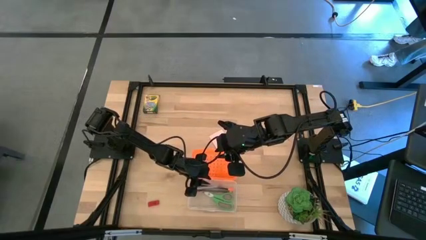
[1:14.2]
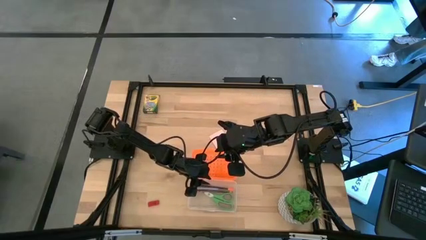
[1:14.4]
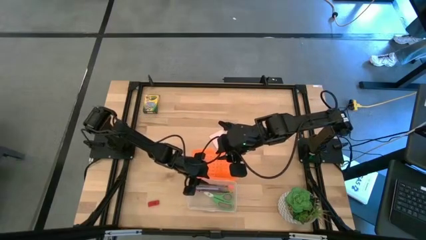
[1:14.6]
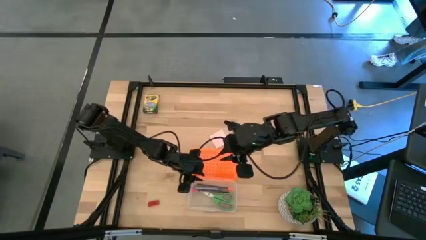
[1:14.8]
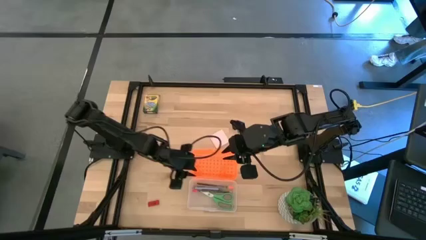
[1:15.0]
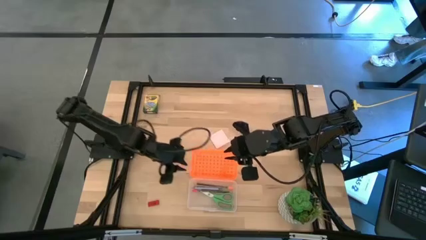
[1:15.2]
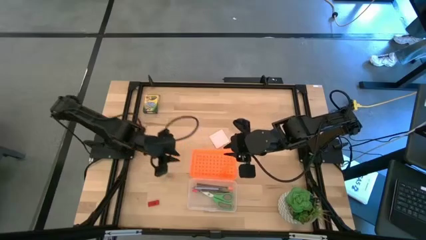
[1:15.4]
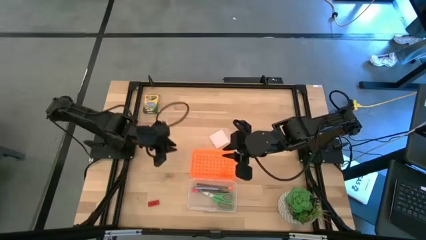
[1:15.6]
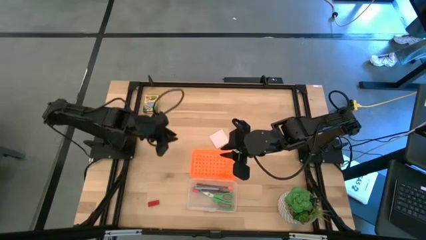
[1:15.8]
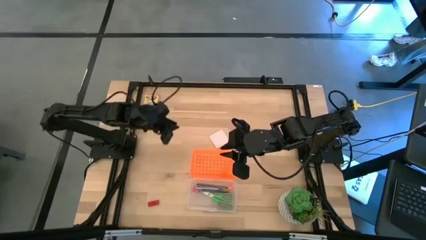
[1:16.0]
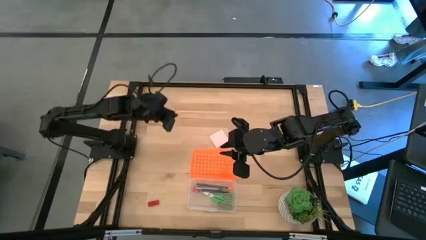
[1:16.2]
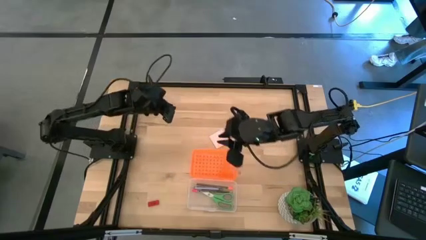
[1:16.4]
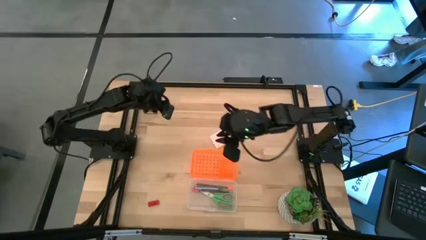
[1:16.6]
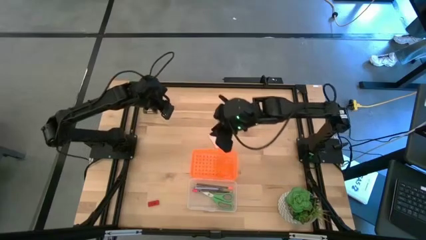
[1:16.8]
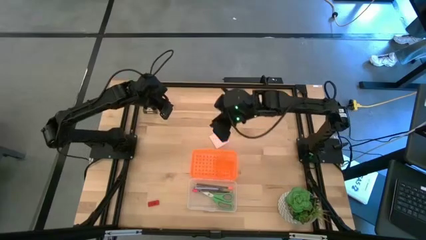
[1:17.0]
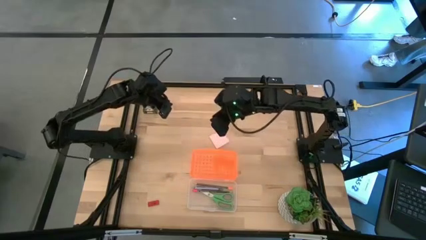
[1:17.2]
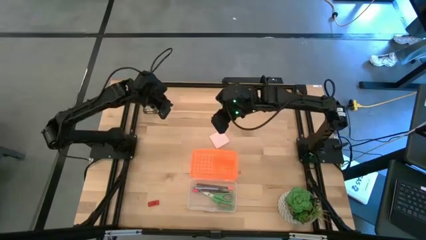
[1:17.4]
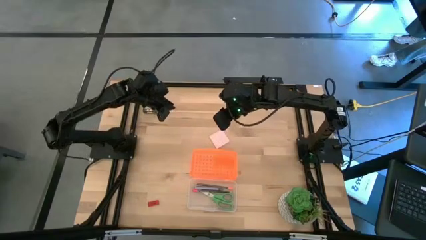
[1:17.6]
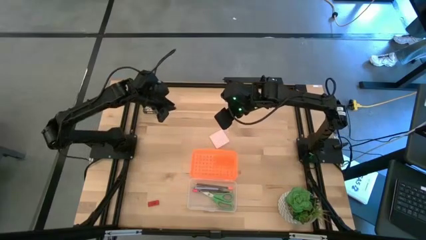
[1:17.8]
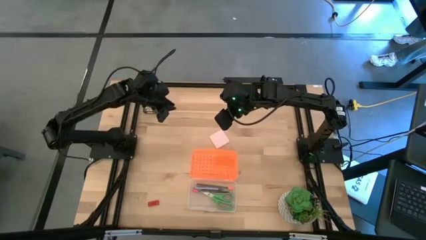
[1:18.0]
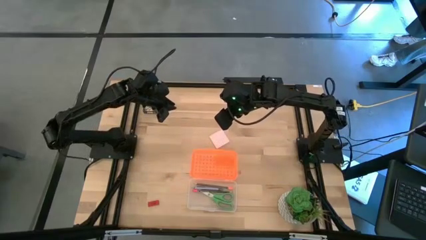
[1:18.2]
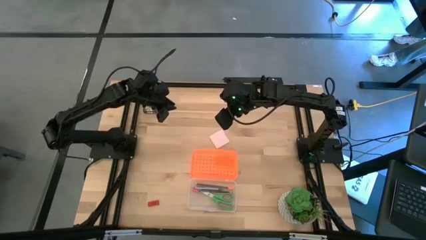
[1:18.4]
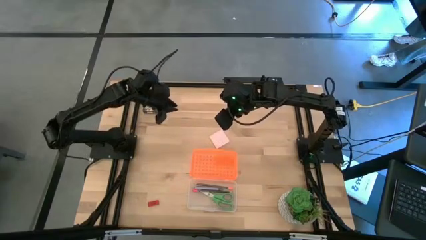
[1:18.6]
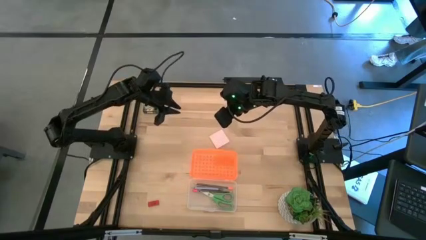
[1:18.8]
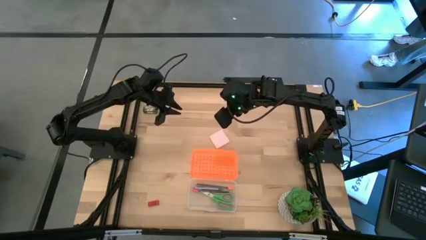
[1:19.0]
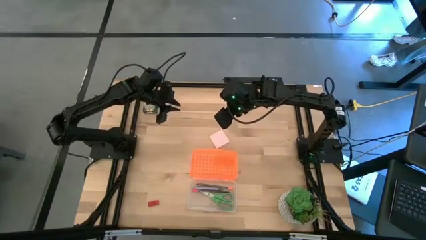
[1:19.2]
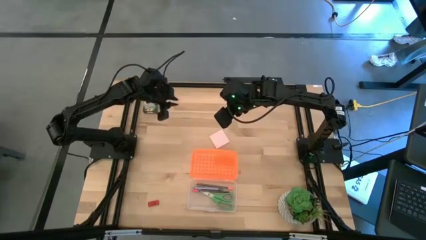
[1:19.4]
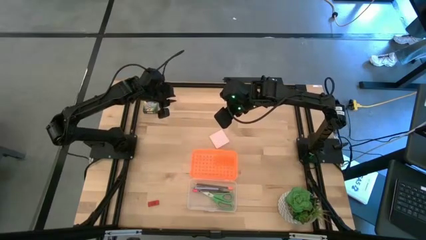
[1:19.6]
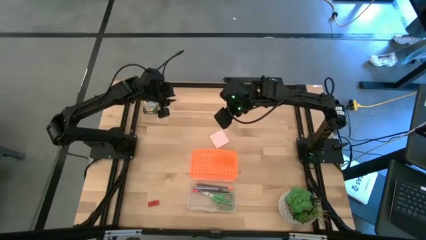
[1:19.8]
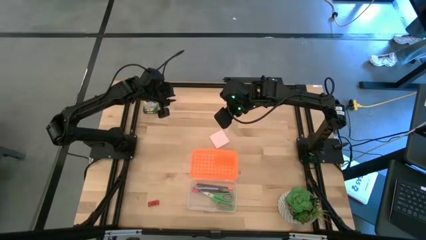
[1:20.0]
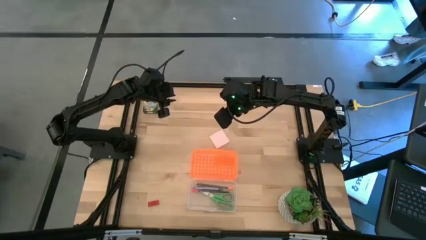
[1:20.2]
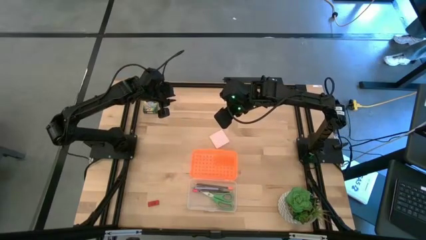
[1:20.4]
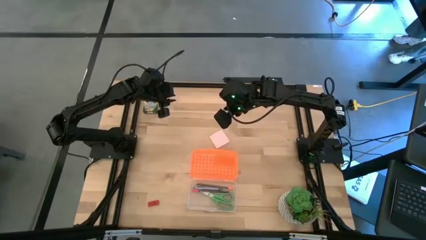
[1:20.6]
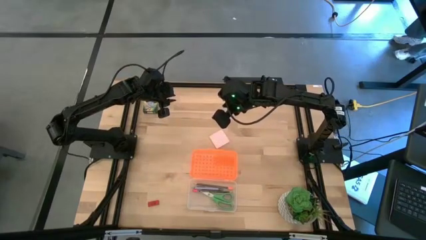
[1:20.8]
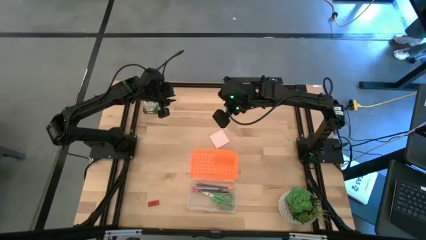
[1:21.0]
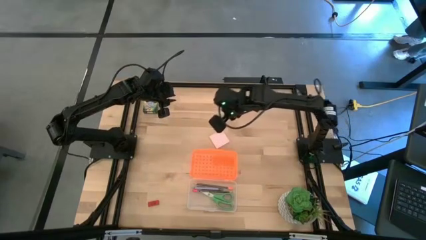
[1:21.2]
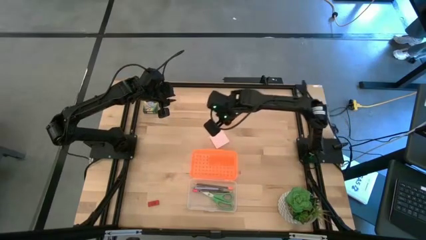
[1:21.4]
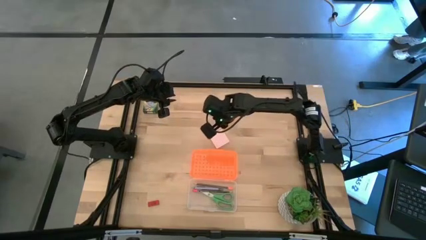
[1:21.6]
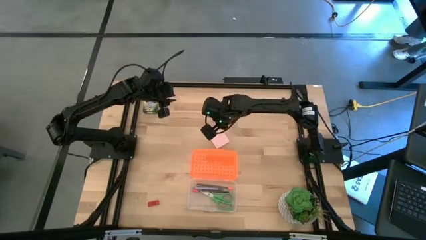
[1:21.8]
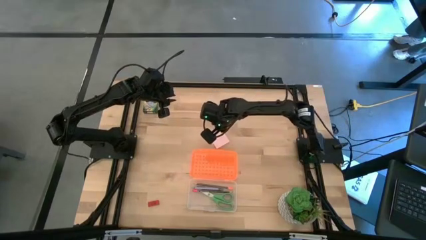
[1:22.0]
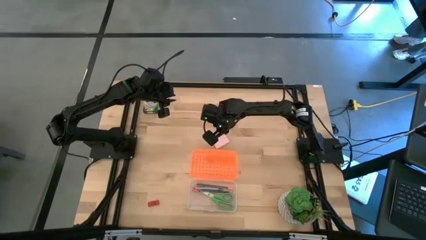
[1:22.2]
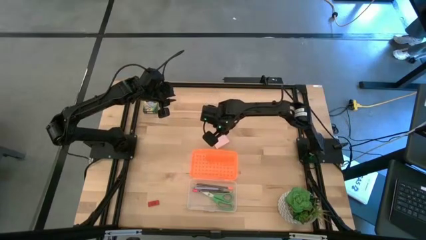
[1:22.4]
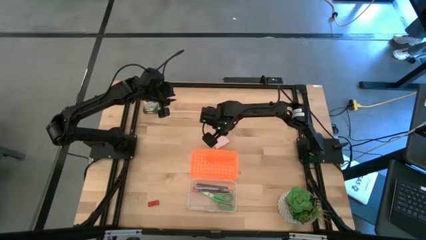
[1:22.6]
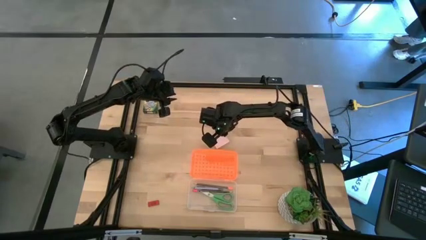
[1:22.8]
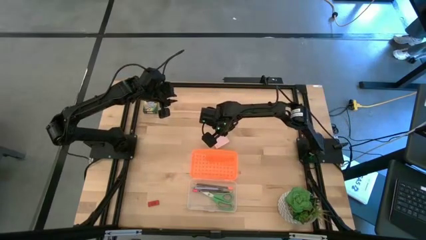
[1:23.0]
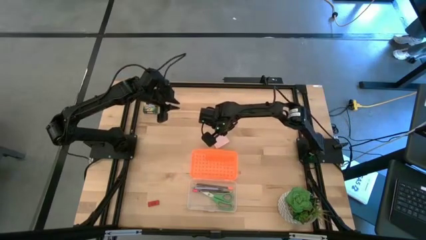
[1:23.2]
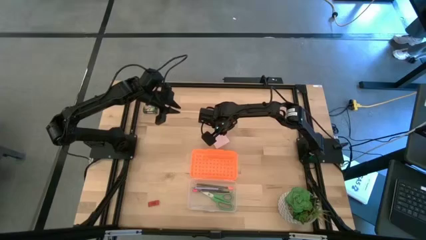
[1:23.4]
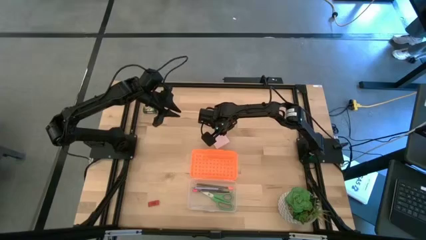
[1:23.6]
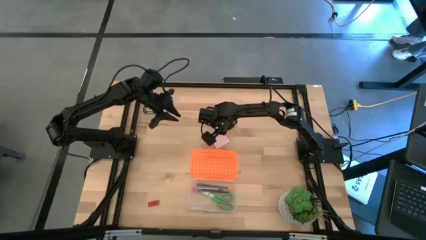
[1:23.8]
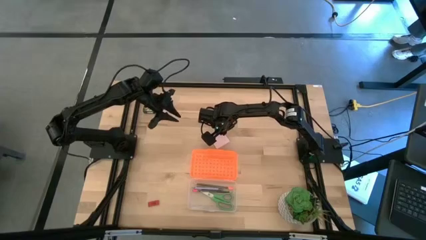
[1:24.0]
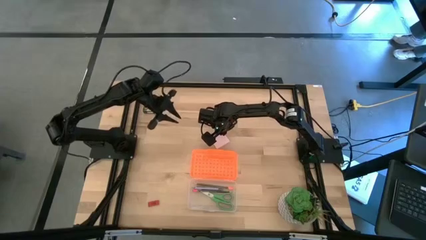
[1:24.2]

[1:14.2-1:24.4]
Task: Pack school essentials
Put the pink sticky note into the orange supply box

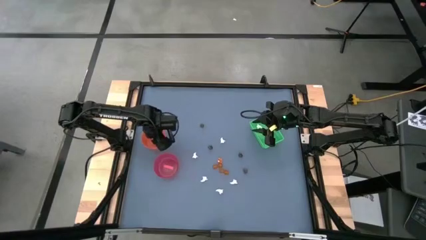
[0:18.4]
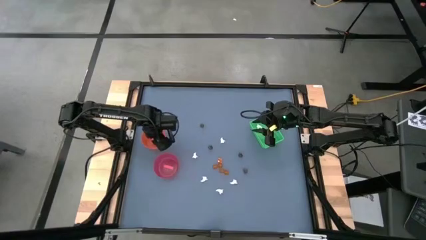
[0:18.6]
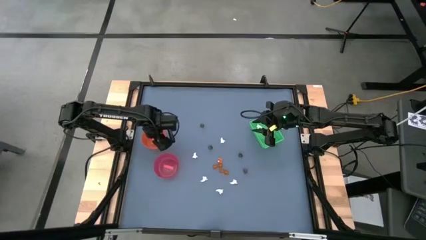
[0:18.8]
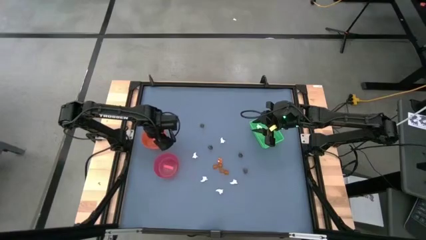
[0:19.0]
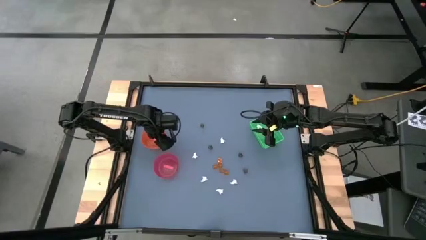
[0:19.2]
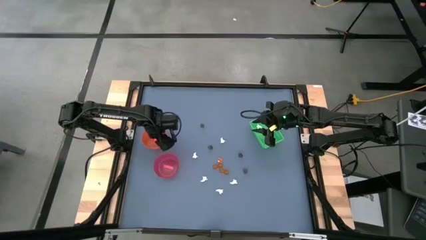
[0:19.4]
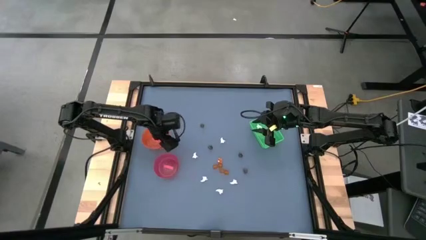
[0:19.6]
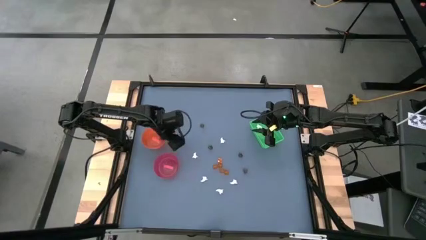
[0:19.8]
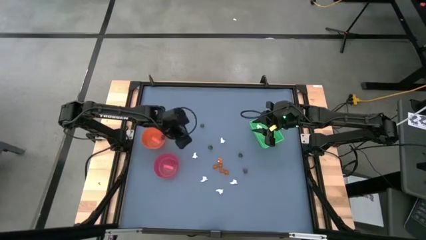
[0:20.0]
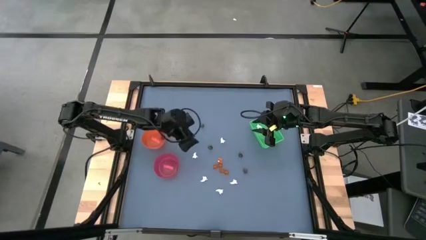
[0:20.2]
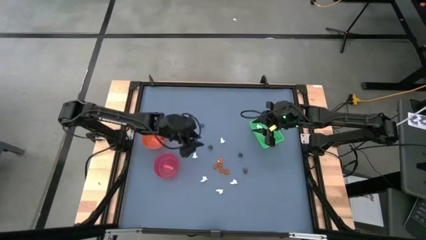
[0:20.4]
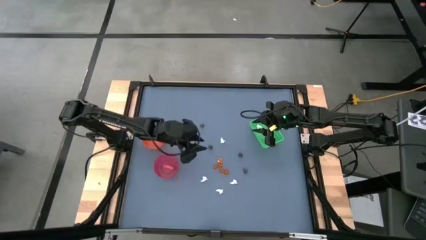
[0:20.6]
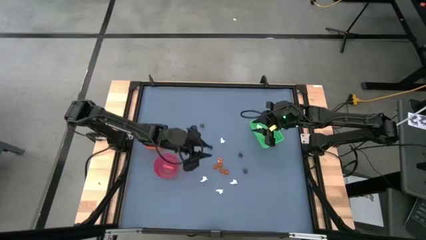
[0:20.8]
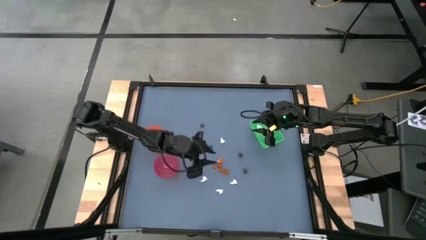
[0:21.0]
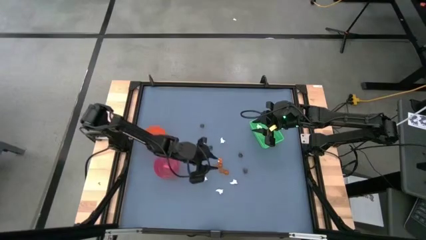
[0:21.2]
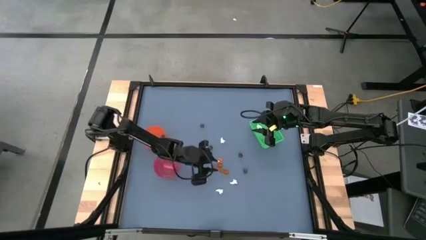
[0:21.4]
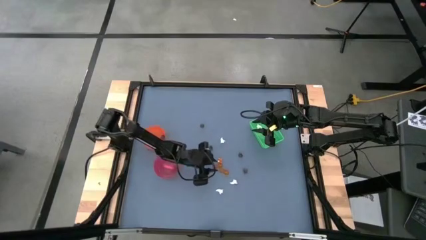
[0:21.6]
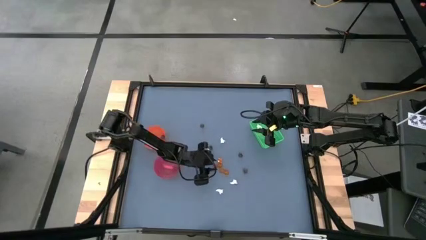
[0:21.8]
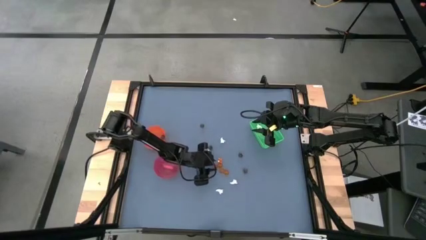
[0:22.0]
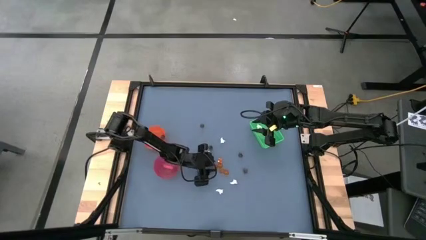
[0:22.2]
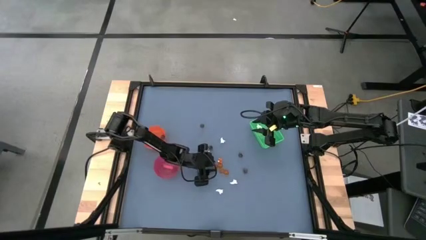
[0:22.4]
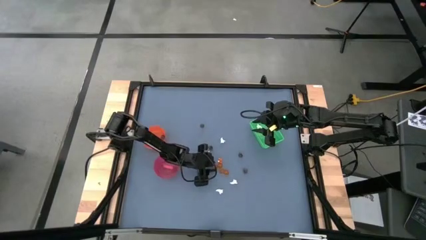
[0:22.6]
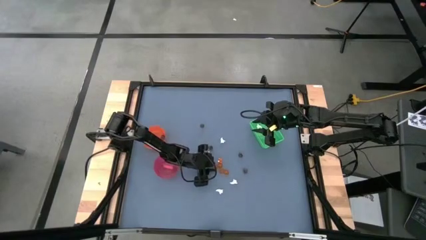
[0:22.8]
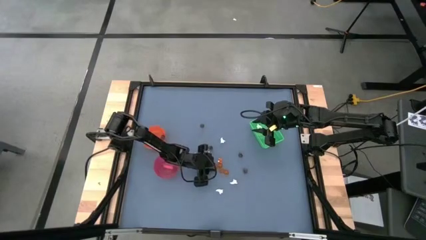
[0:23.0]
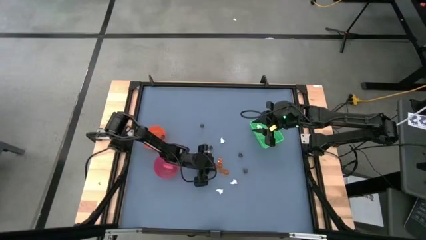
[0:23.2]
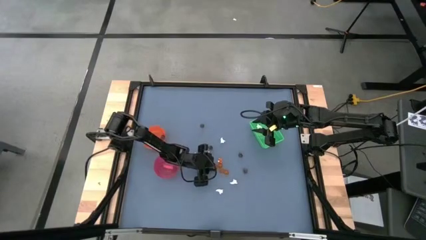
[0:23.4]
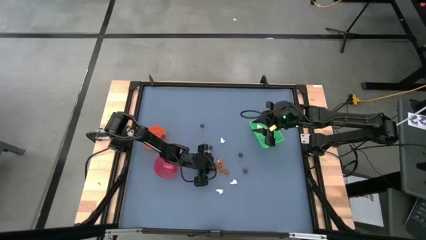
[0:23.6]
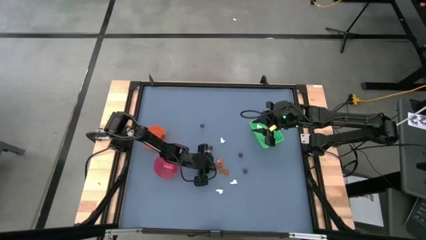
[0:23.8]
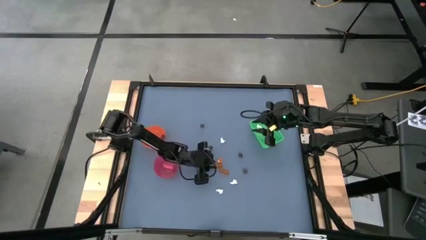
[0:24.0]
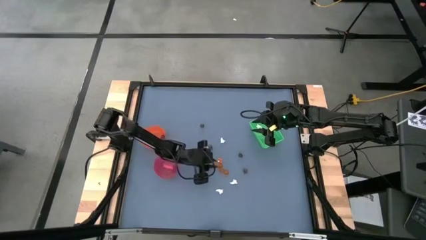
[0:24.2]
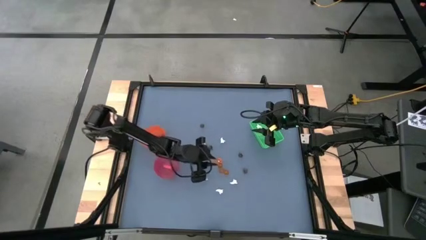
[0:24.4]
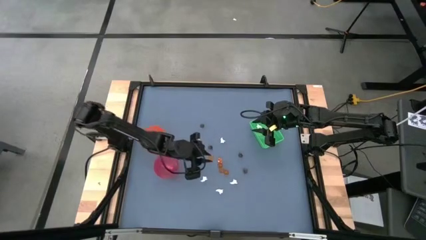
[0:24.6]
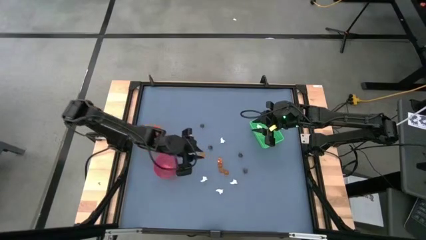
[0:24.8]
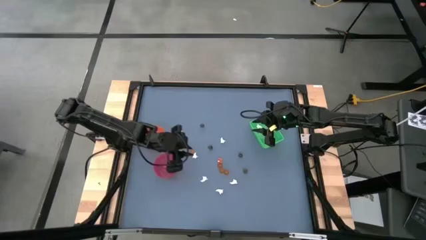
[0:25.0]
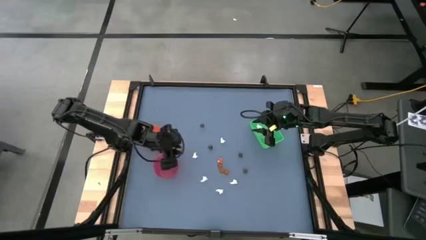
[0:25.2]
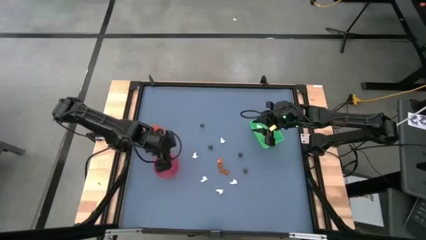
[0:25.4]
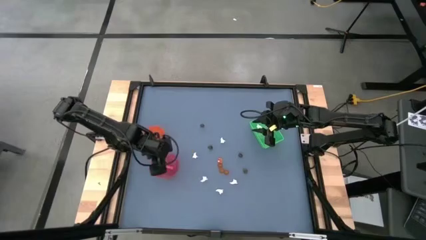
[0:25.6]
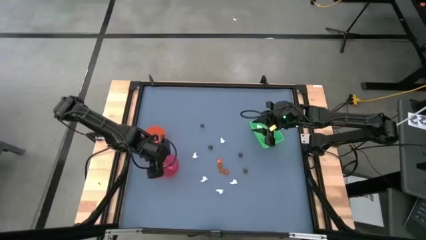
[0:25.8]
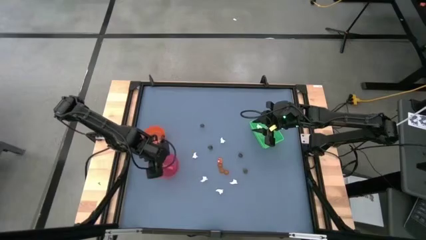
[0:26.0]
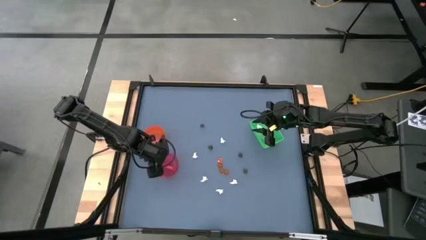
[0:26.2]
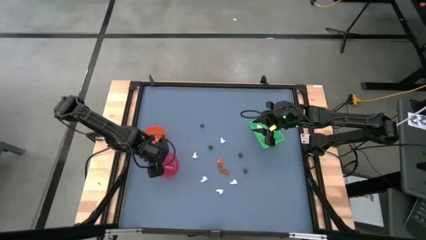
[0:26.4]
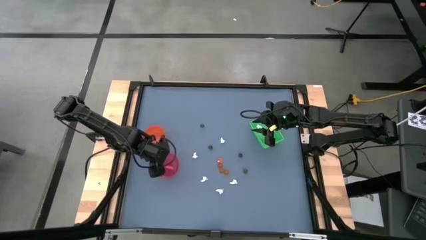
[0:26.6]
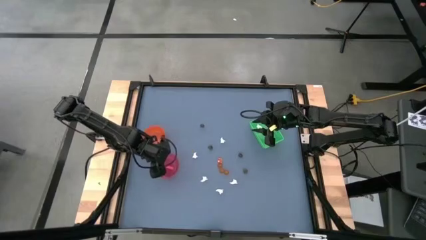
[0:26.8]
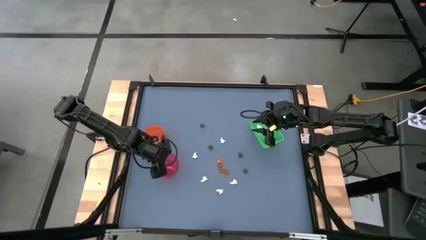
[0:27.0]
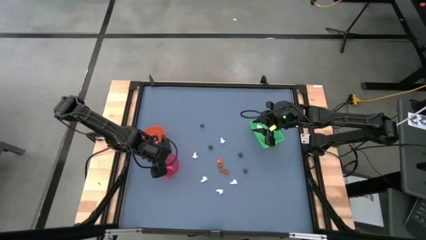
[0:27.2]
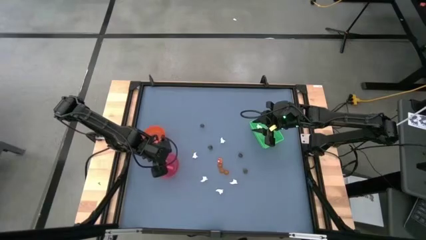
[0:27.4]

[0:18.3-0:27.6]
Task: Sort Halloween decoration
Put the orange pumpkin toy into the red bowl
